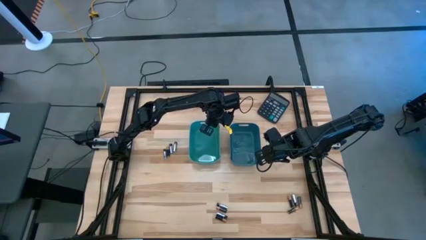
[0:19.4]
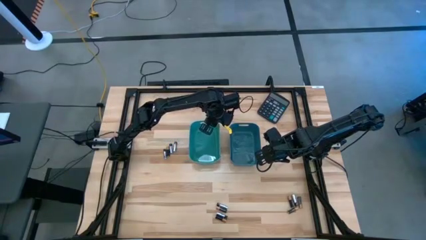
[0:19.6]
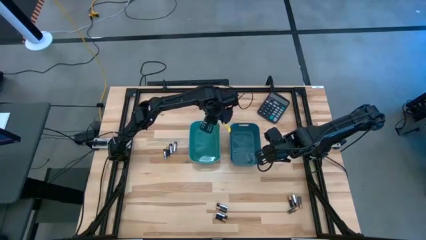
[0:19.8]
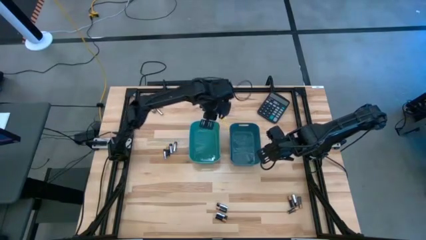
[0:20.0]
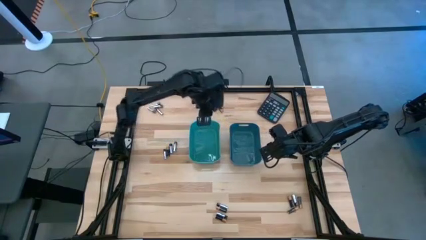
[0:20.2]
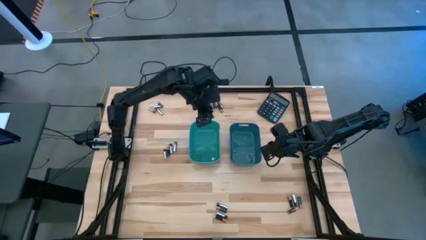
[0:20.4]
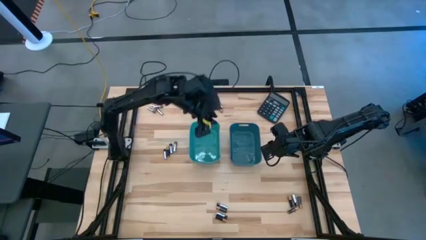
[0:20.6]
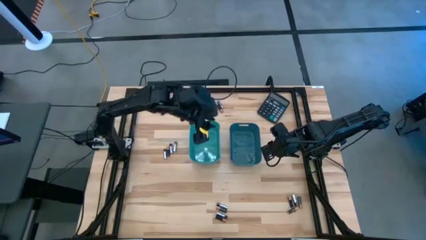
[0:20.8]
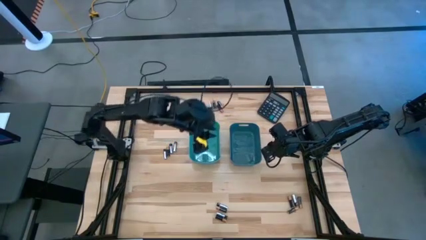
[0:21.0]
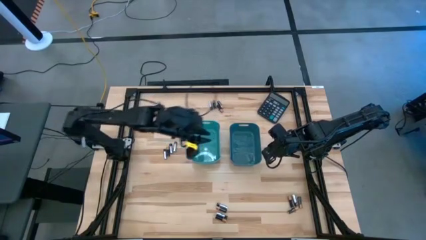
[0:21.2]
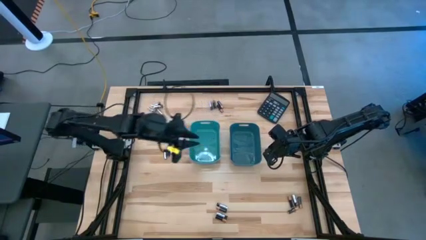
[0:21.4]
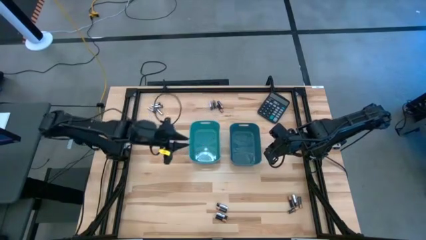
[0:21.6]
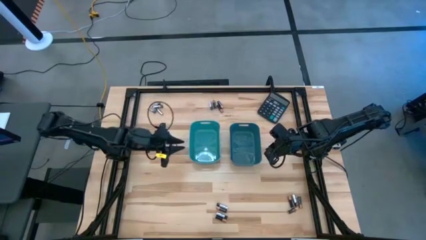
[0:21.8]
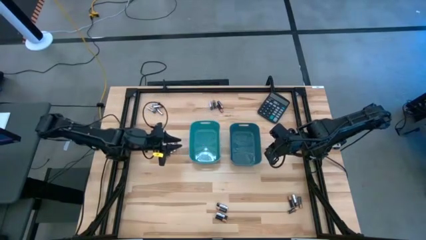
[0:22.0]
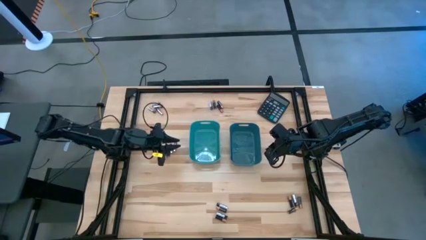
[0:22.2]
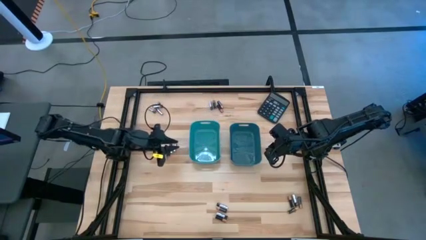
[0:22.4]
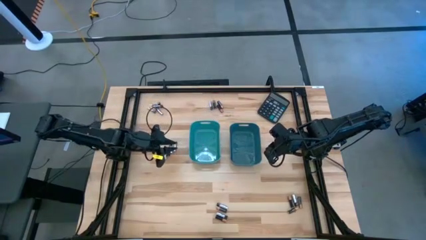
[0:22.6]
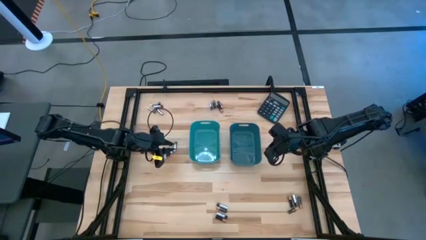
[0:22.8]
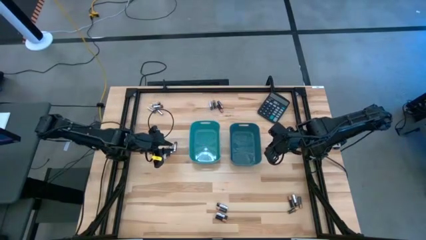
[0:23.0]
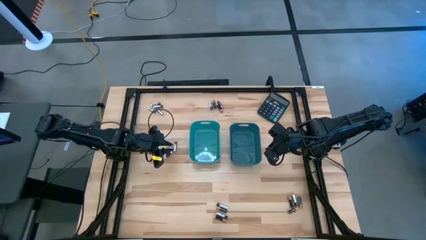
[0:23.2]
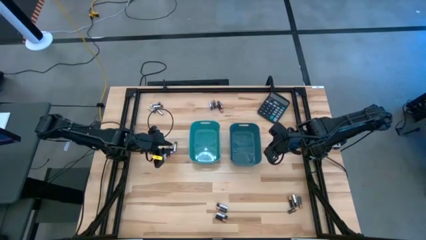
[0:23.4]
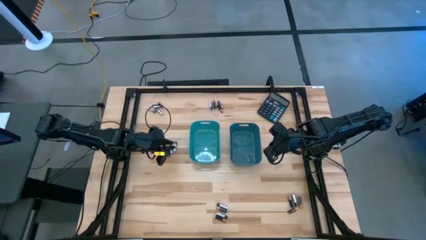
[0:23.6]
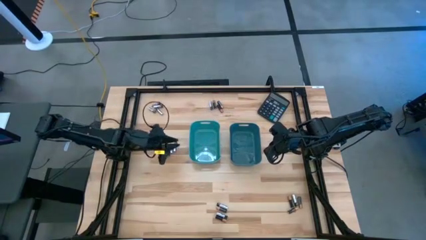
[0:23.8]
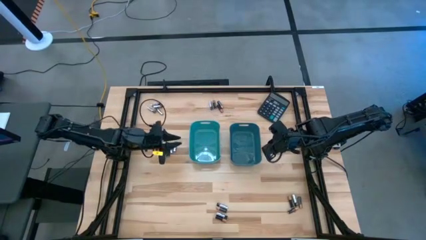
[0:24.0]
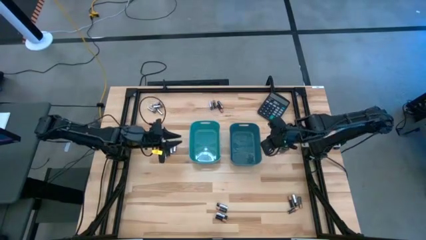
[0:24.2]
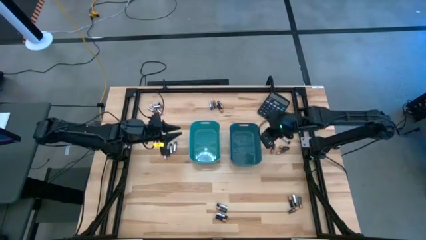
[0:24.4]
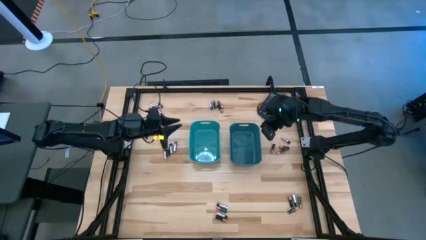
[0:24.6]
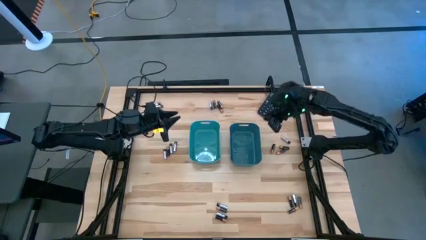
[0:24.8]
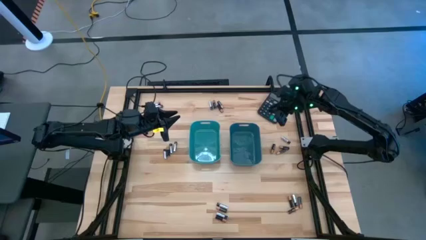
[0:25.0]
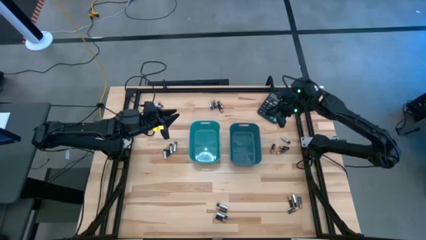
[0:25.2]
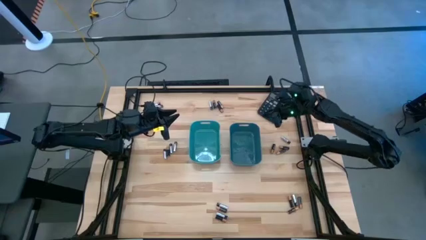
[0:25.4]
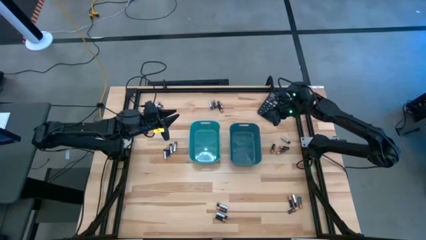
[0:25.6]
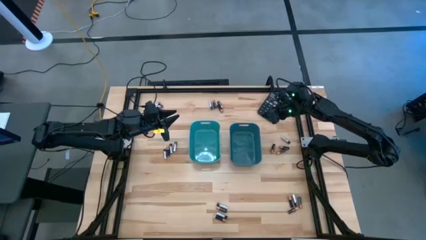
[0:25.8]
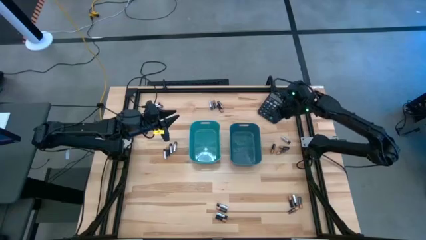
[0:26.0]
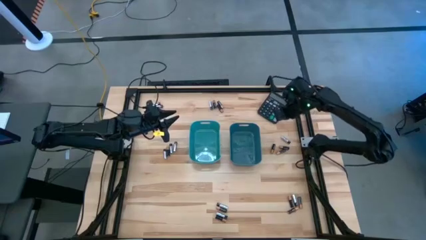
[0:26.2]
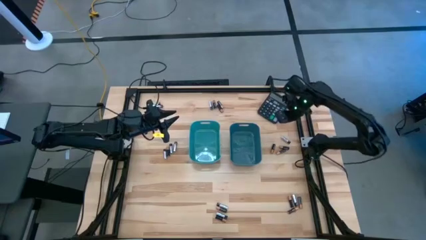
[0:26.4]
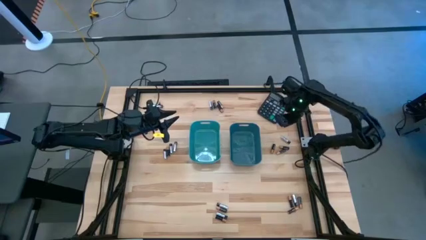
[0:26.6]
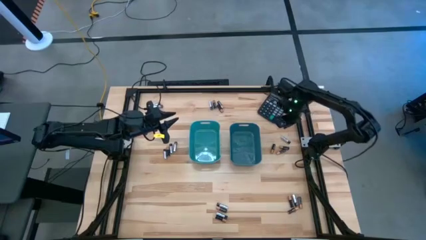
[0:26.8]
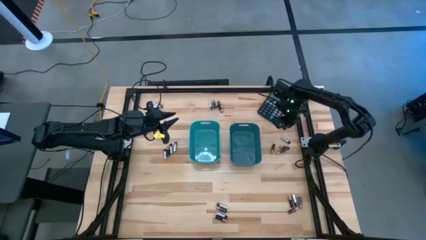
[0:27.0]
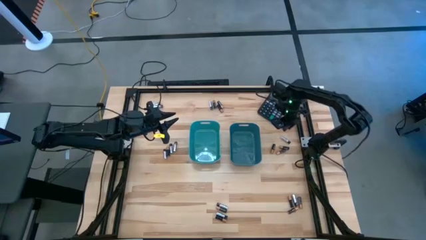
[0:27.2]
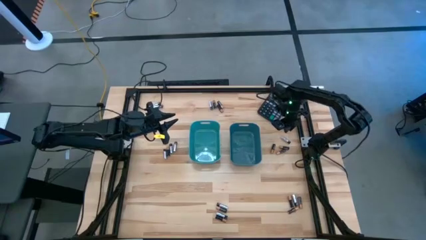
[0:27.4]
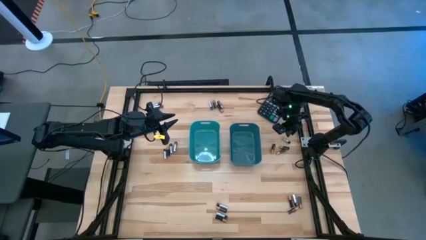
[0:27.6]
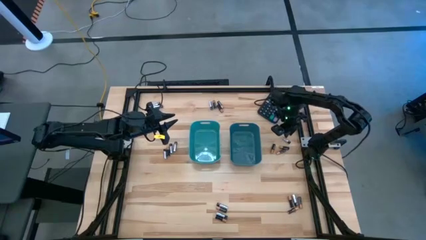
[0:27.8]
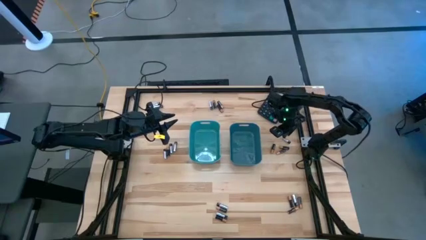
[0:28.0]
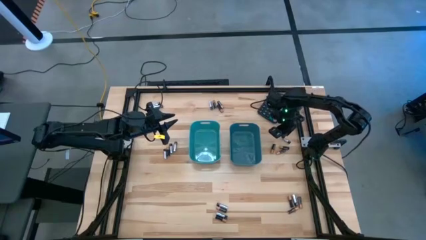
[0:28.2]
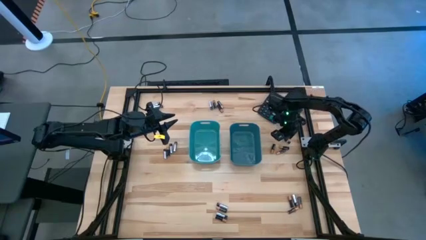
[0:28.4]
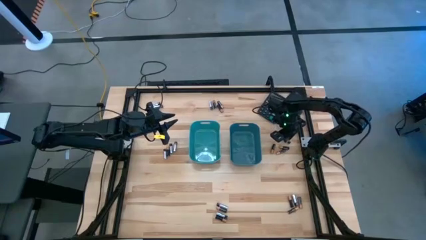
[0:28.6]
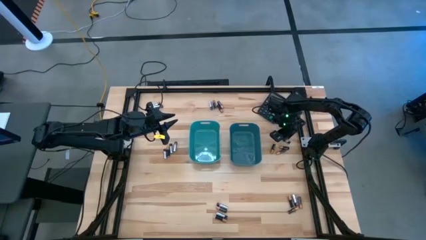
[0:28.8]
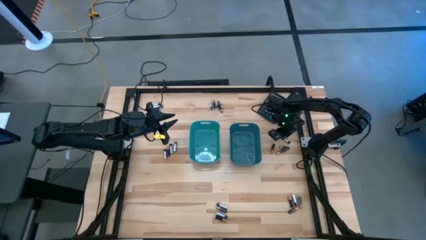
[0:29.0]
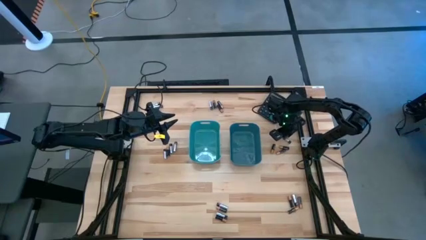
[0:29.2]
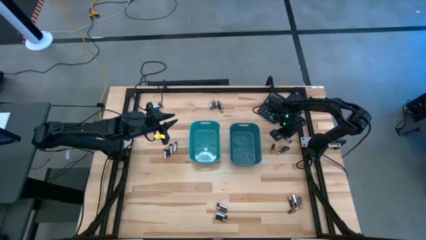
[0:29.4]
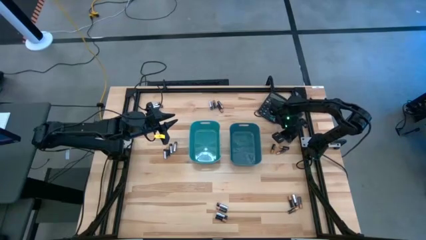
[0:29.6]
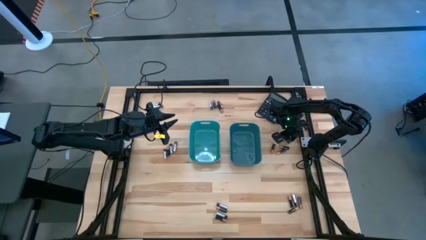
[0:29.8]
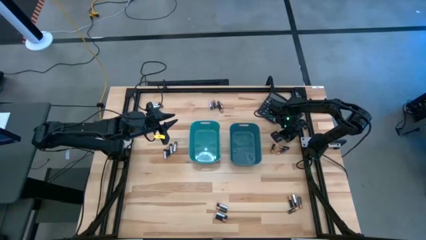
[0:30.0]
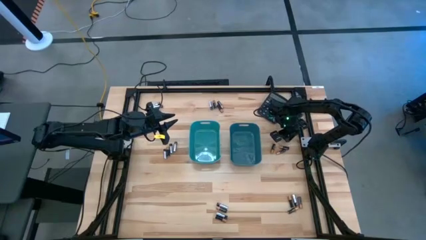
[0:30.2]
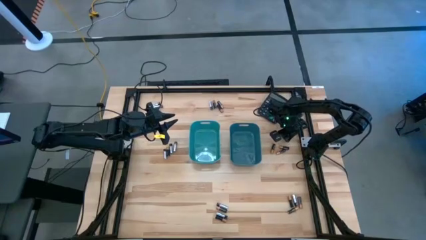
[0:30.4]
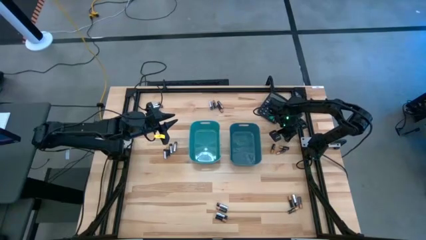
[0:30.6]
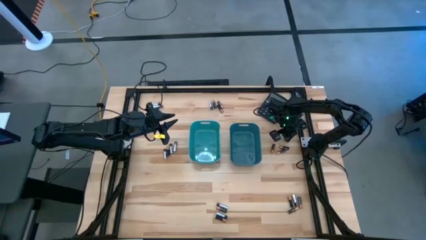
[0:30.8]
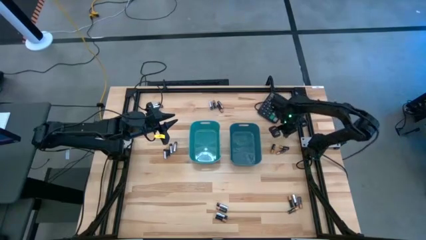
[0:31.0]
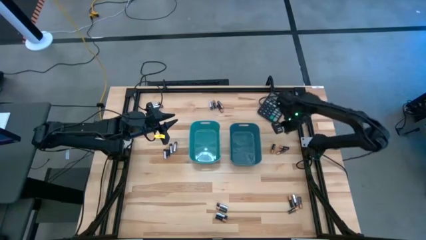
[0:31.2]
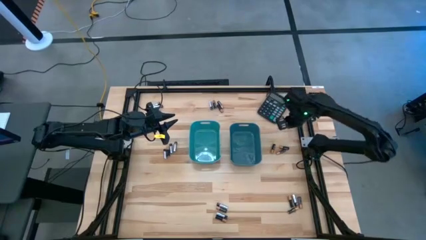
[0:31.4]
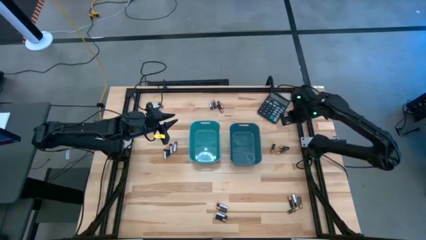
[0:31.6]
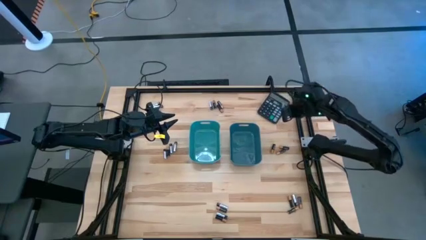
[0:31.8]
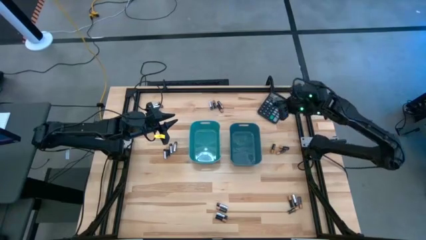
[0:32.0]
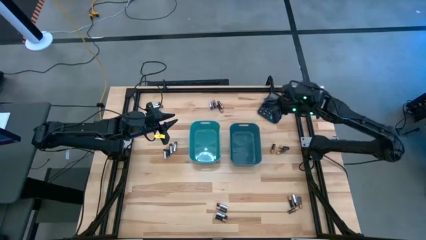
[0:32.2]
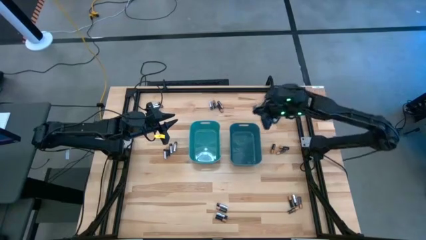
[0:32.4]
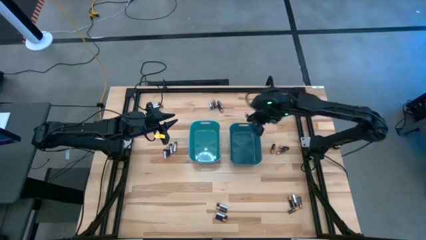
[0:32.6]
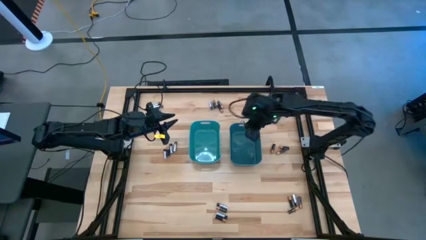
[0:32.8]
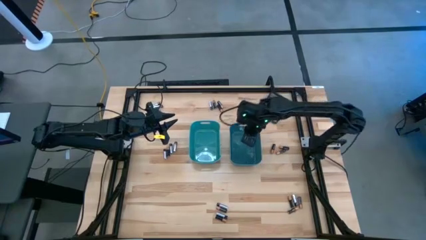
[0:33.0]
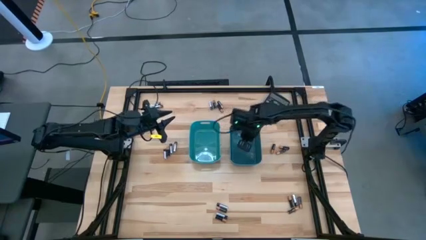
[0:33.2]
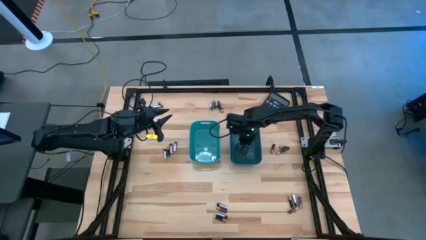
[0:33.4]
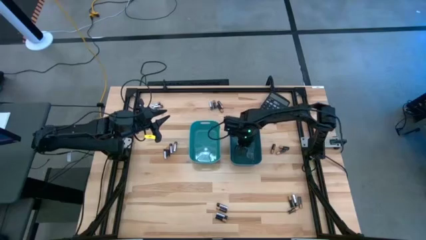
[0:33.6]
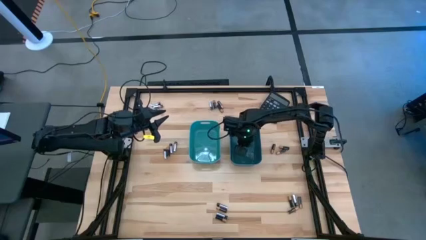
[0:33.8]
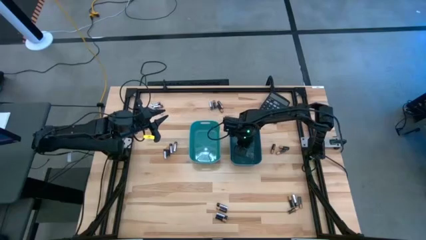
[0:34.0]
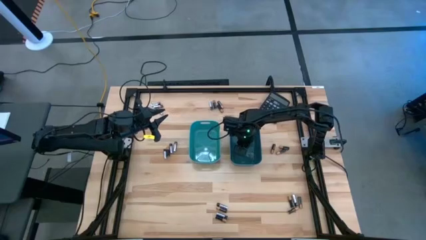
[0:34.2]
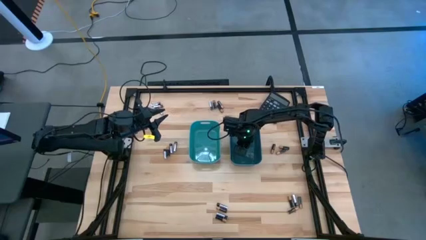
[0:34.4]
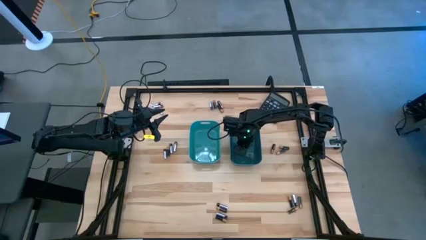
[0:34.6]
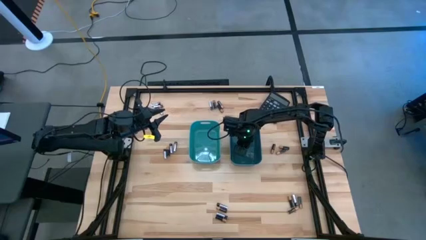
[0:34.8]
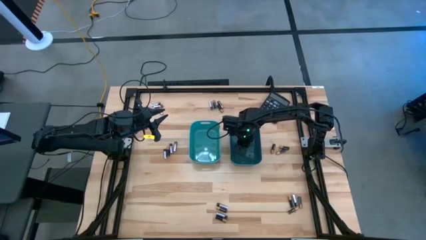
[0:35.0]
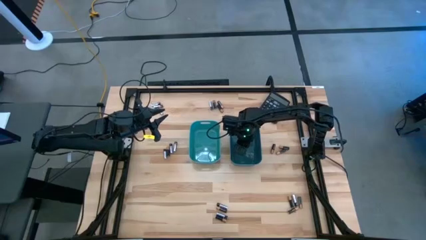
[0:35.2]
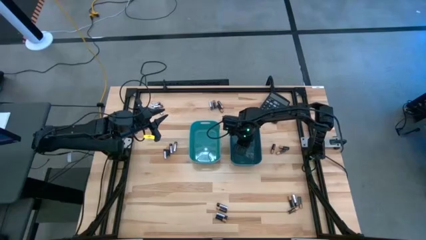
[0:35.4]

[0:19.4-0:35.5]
Task: Sort batteries
Put the silver battery into the blue bin
